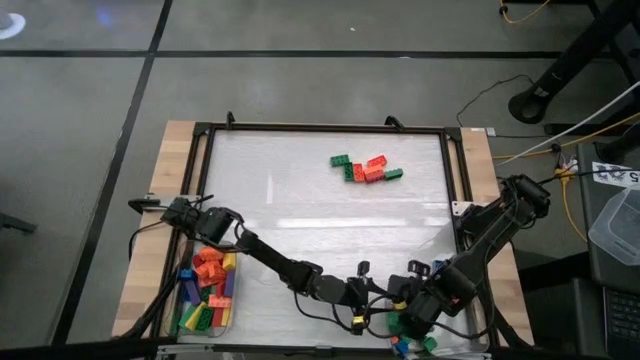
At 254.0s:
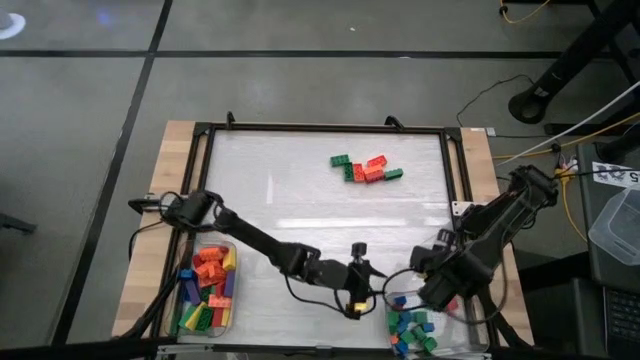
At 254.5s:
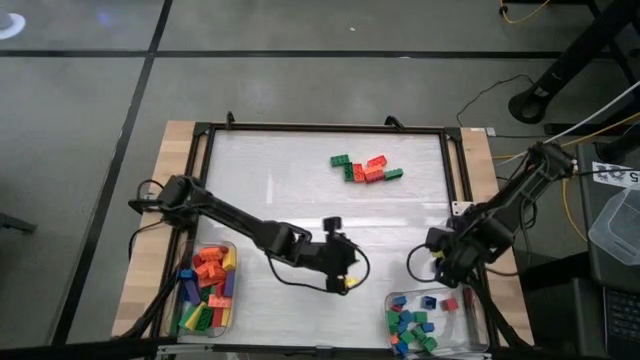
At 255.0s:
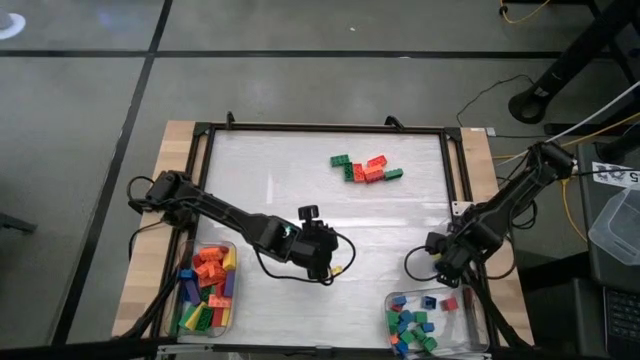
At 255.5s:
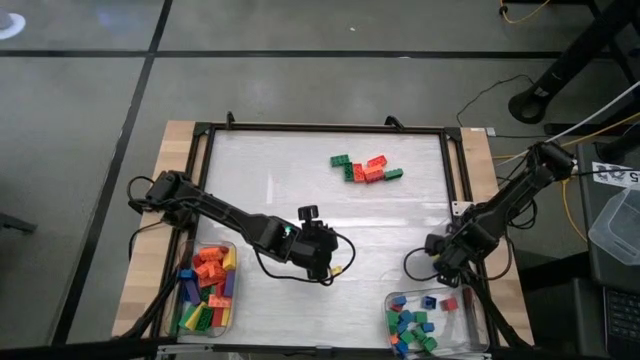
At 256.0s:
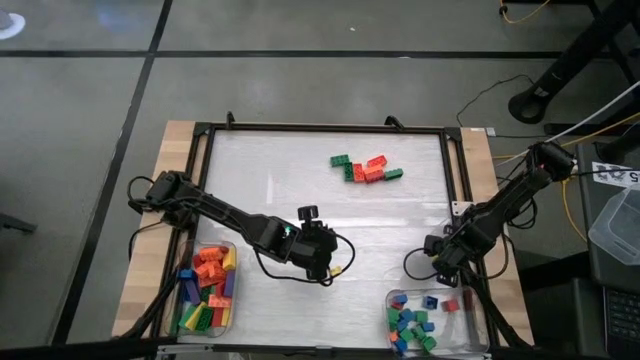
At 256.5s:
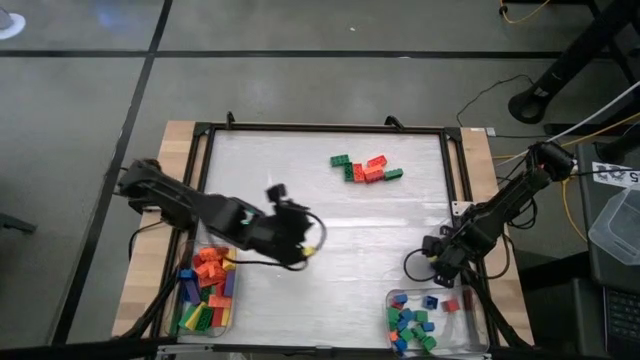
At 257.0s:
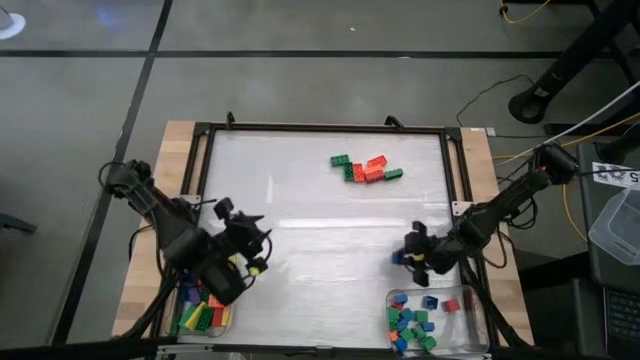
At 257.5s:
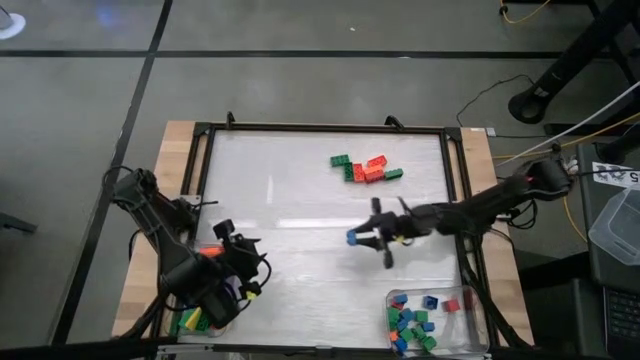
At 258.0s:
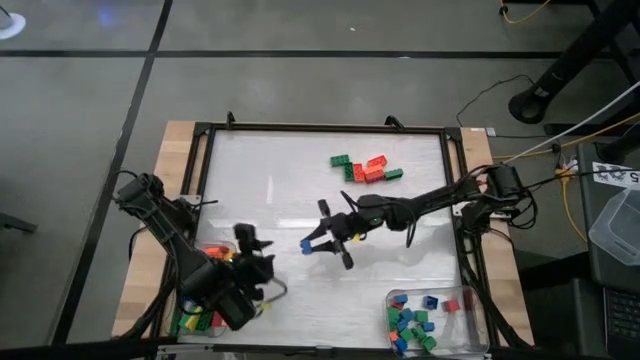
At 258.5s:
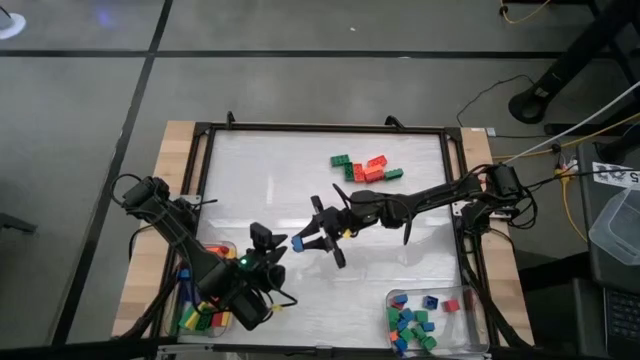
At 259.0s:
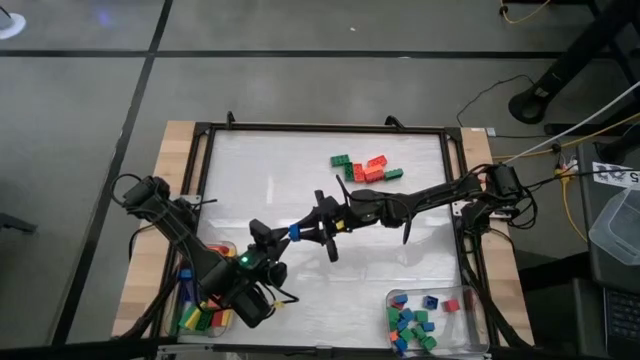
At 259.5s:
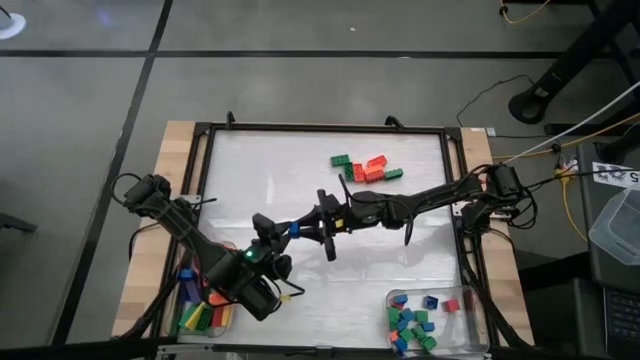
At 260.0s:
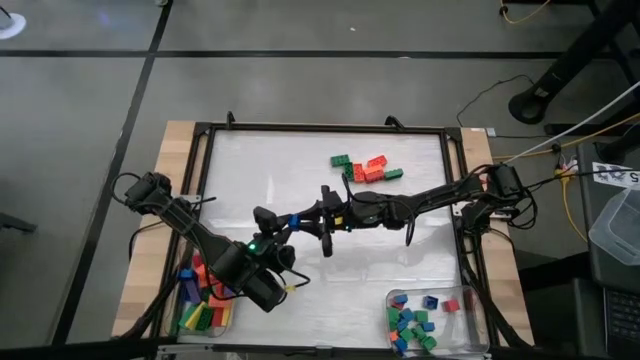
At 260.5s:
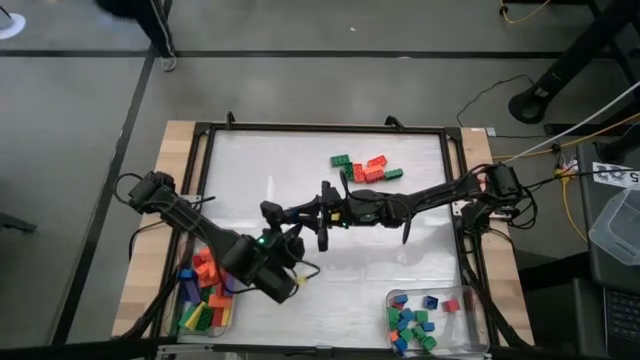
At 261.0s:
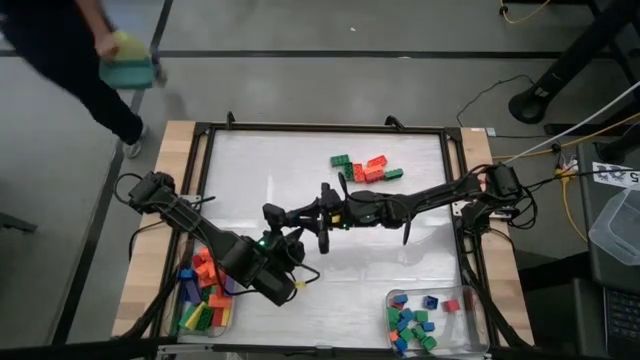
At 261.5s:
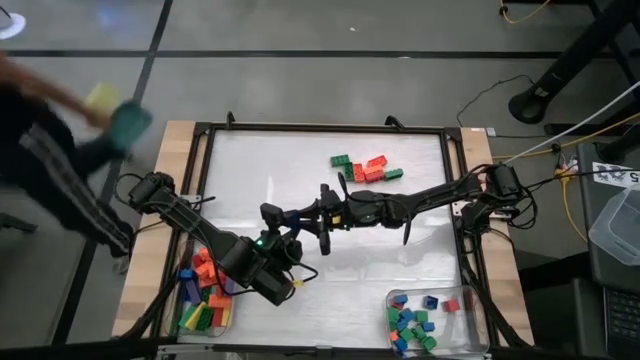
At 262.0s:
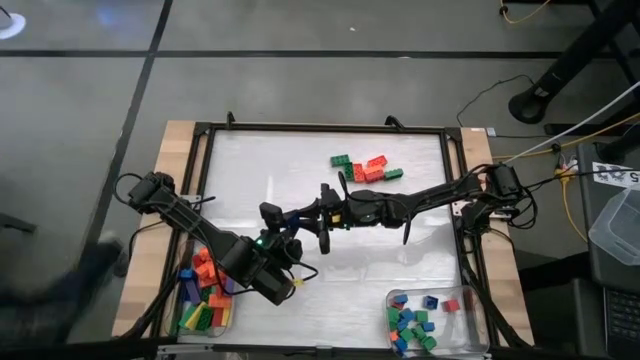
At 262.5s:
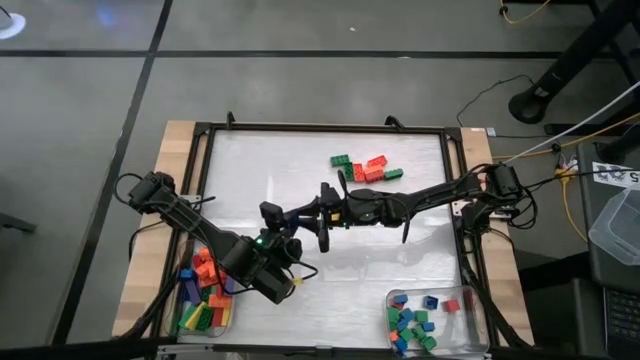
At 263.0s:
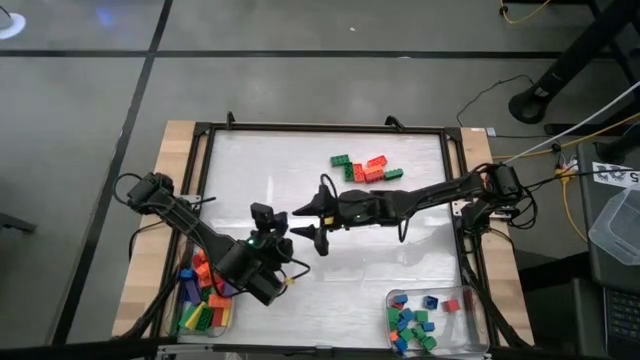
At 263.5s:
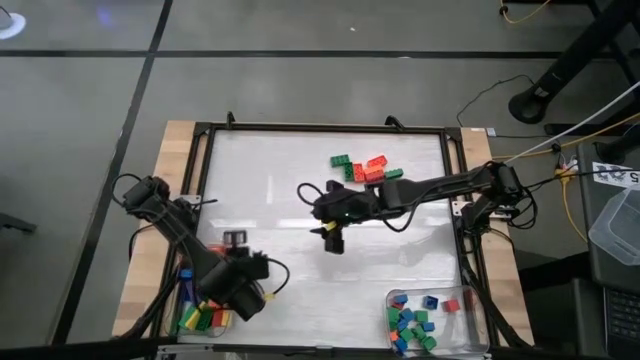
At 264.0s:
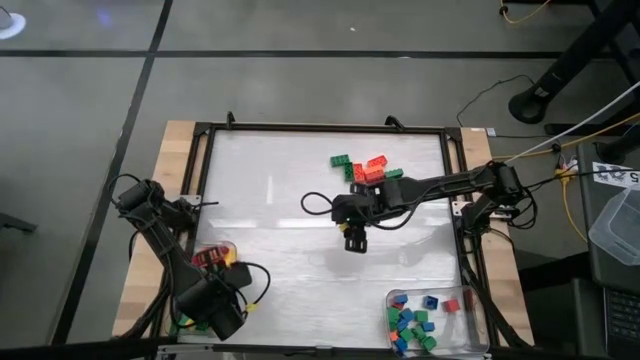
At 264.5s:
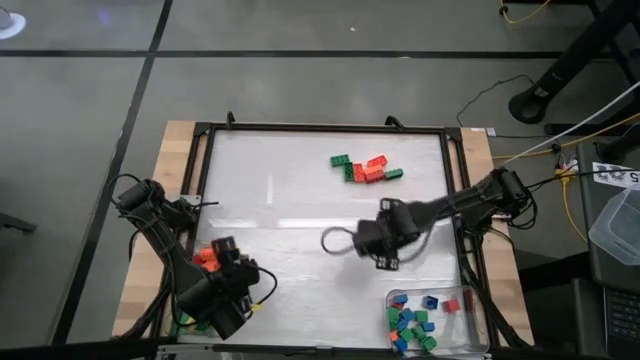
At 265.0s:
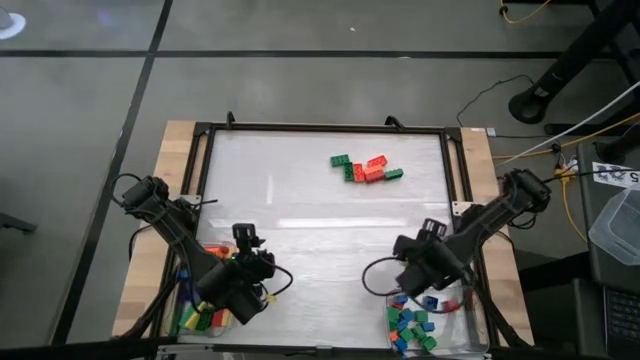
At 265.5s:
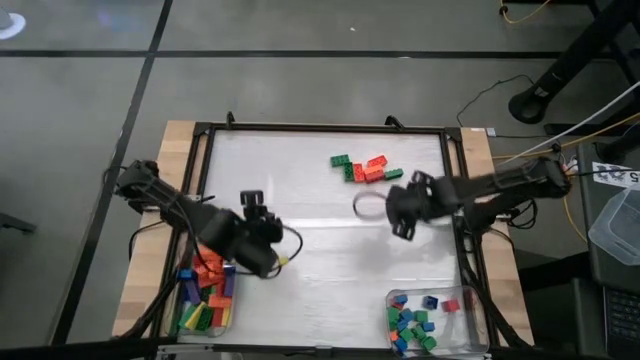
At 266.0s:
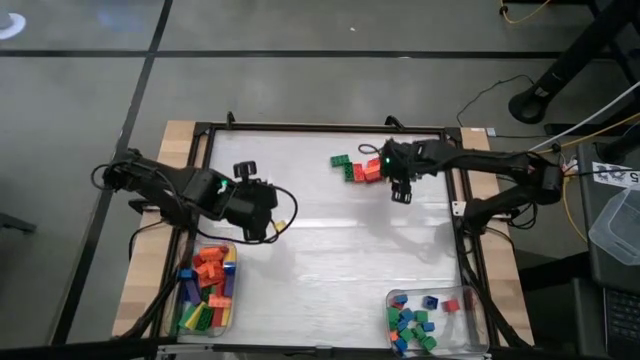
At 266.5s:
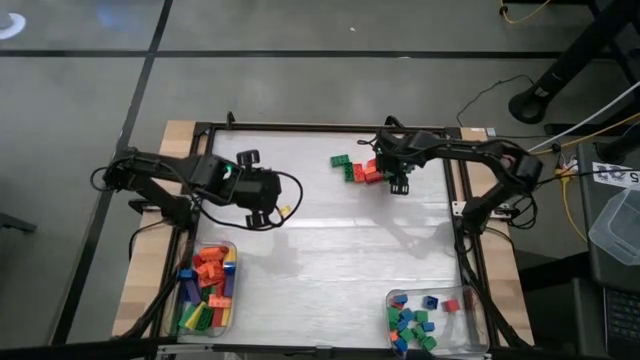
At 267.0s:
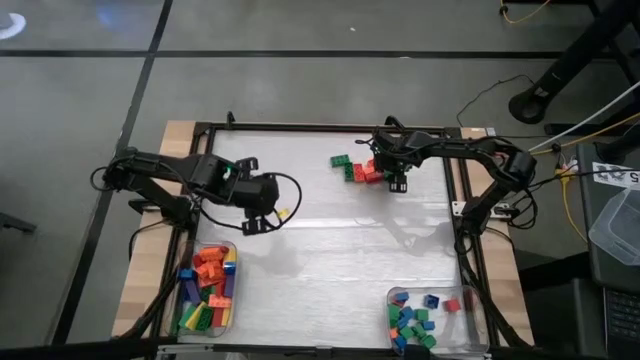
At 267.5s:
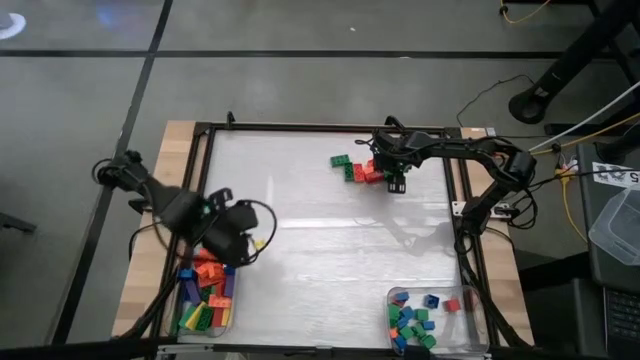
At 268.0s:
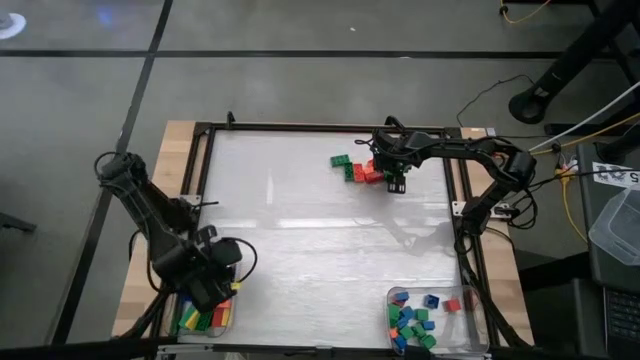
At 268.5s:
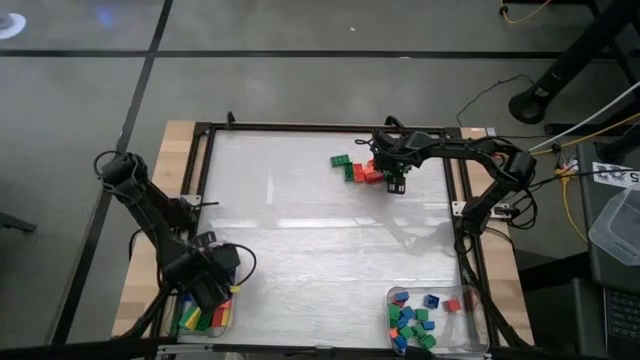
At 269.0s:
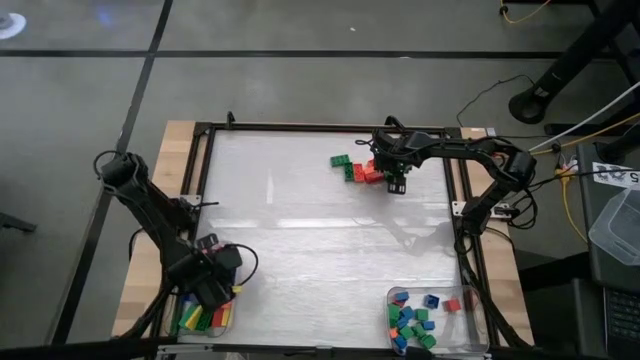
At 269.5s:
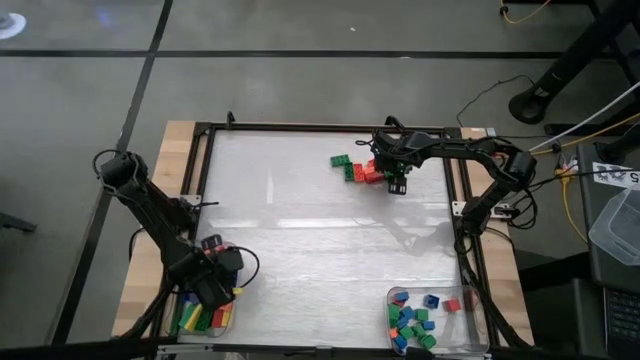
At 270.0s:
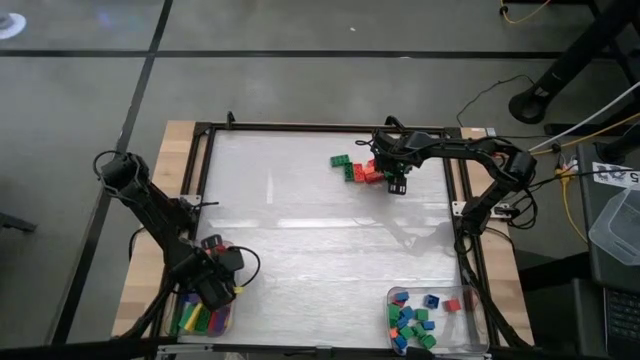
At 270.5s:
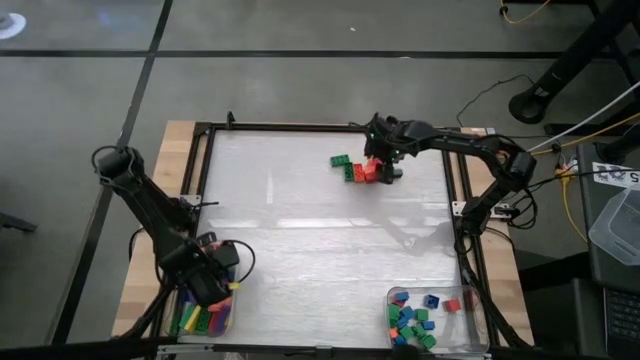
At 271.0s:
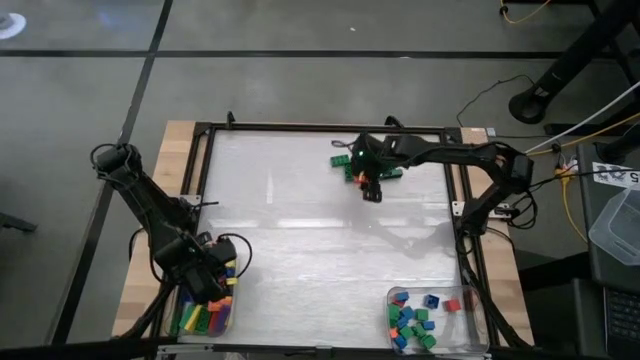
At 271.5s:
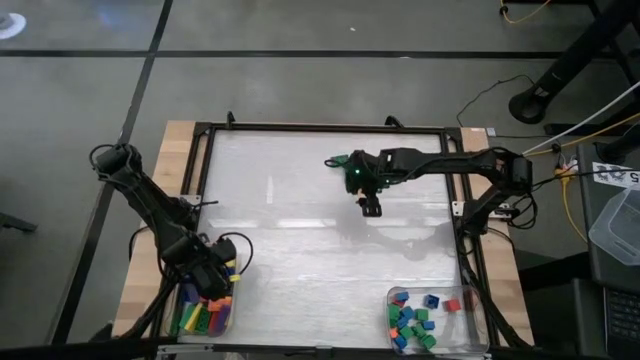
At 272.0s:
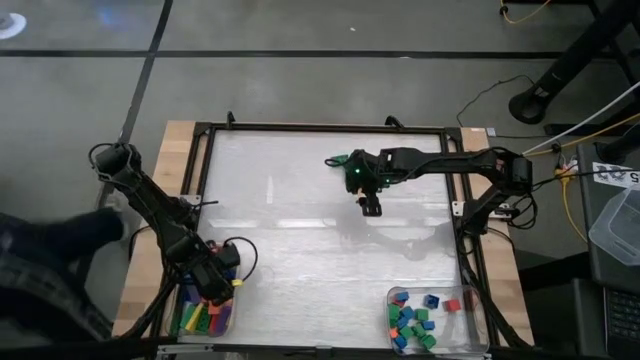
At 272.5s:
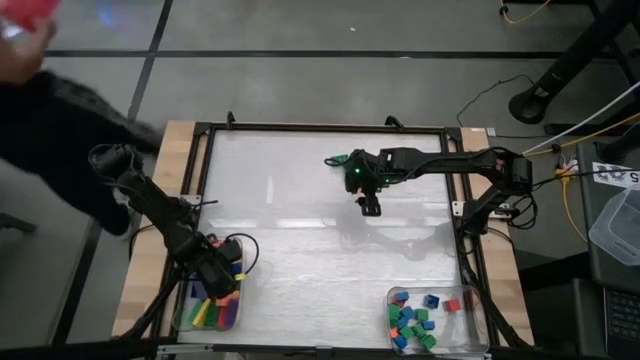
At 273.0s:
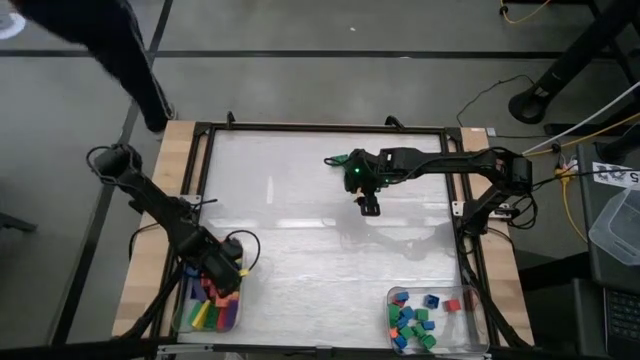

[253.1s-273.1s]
Task: Sort blocks by size
Put the small blue game piece into the right transparent bin

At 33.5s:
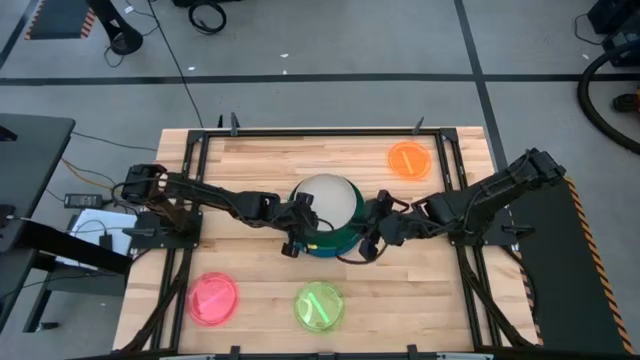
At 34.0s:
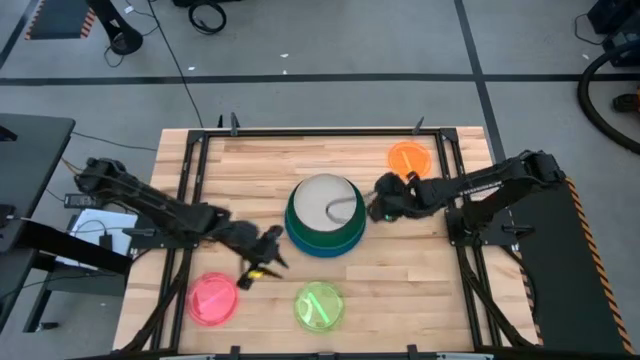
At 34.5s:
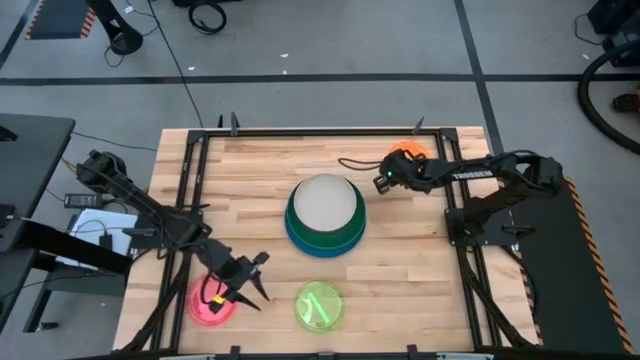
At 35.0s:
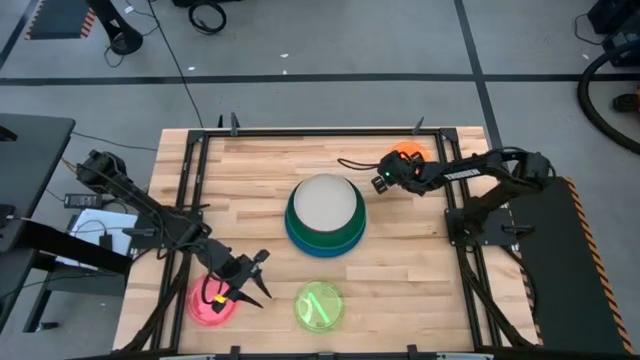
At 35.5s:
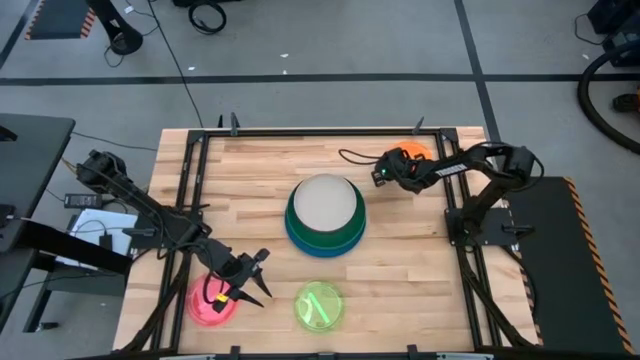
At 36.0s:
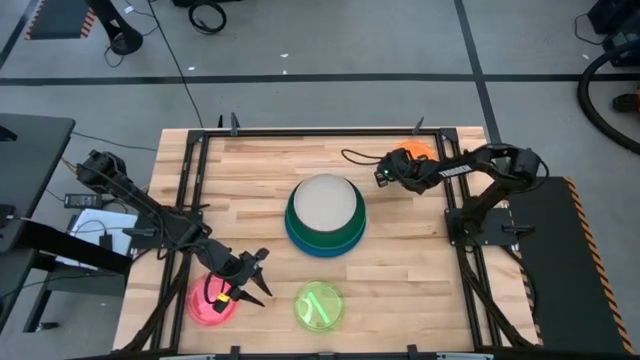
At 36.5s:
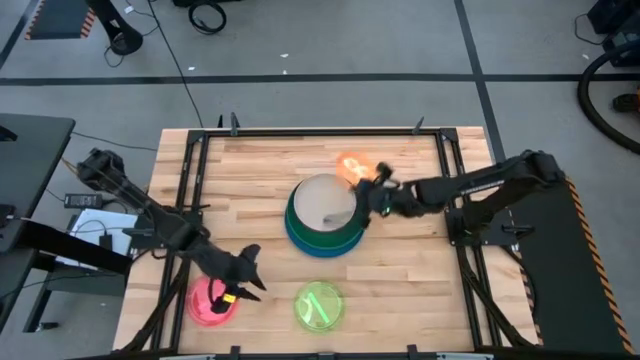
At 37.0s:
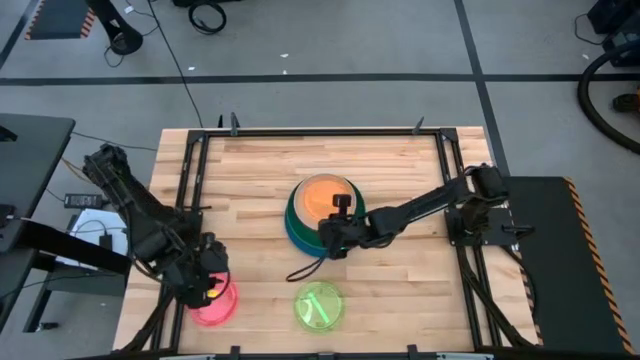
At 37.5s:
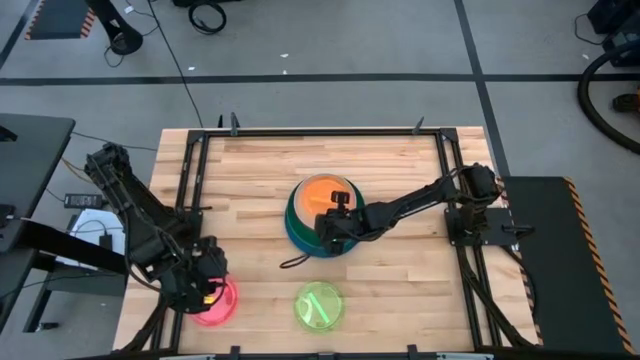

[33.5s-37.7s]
Task: Stack plastic plates
Stack the transparent orange plate on top of the gray plate
